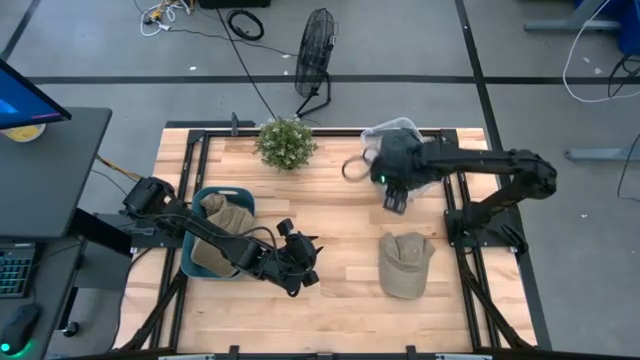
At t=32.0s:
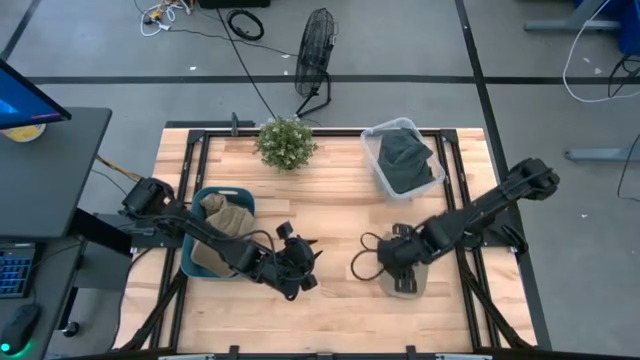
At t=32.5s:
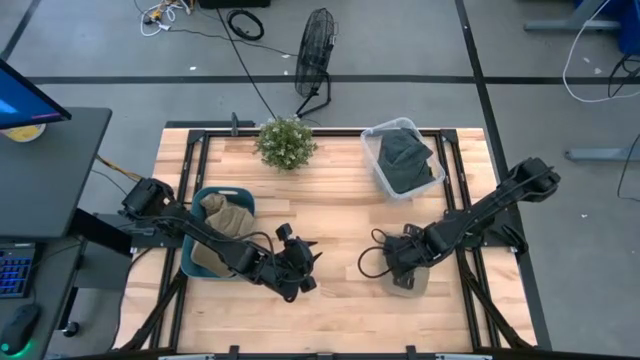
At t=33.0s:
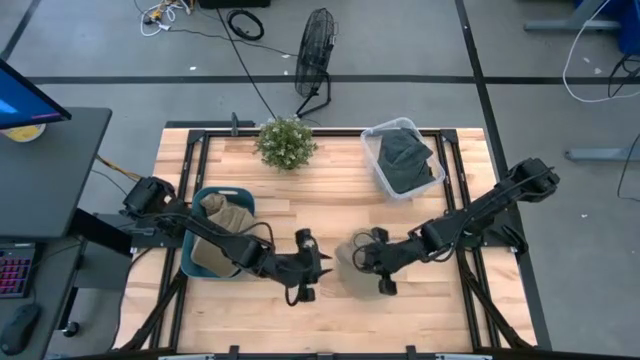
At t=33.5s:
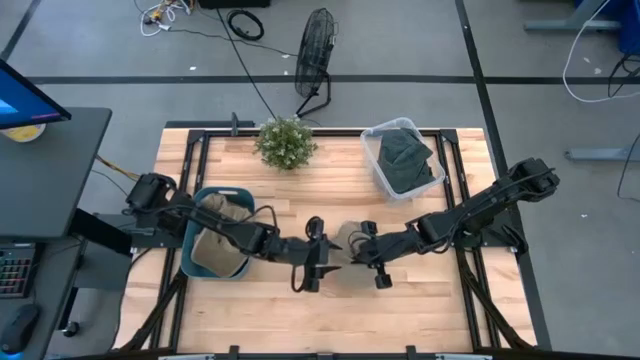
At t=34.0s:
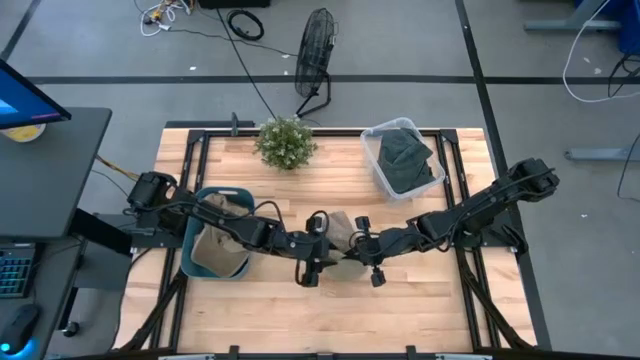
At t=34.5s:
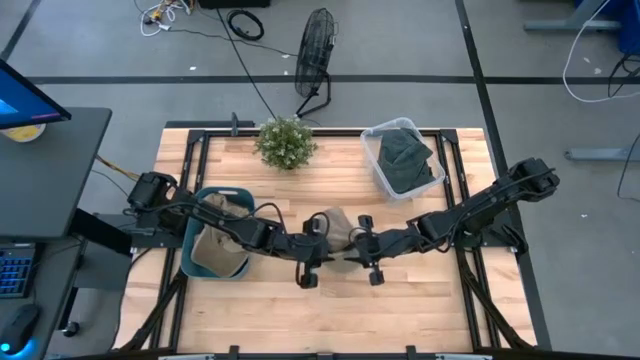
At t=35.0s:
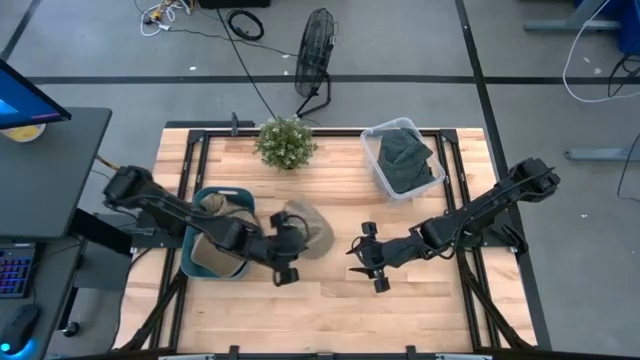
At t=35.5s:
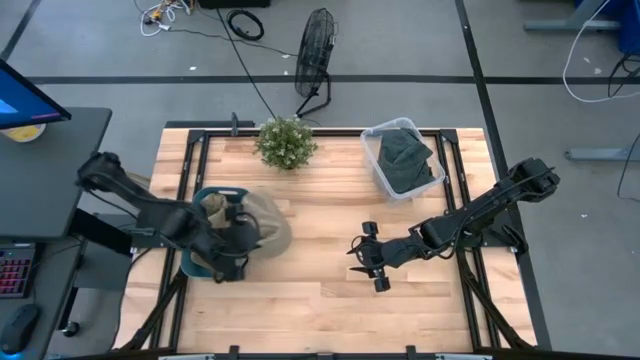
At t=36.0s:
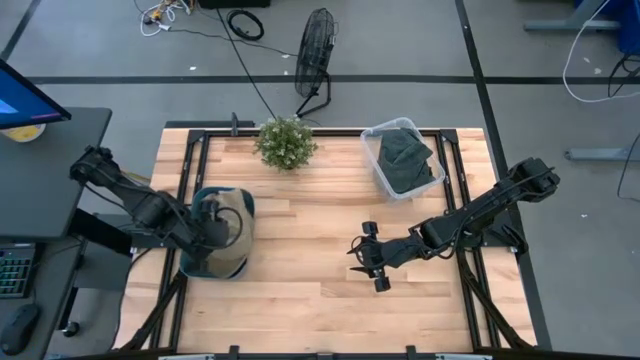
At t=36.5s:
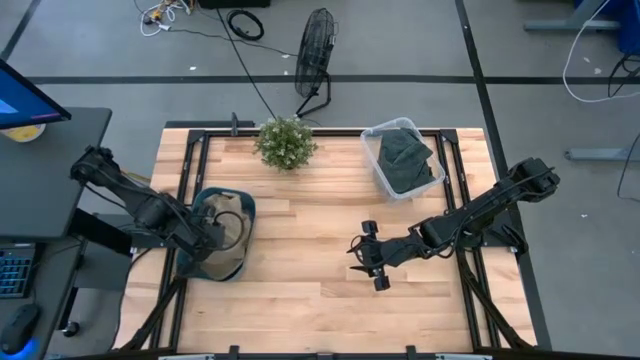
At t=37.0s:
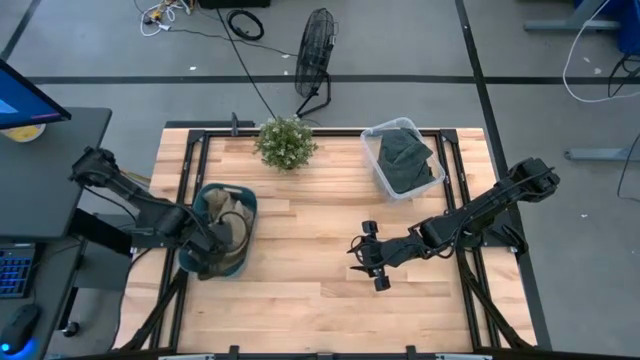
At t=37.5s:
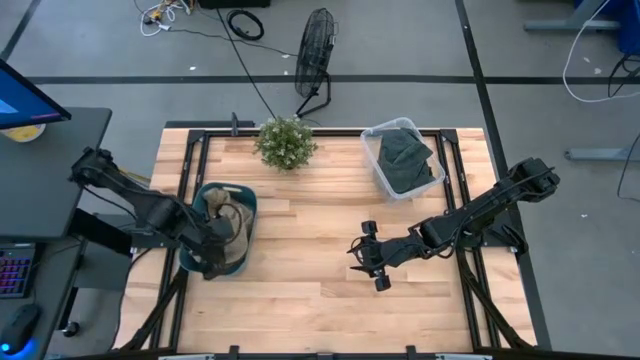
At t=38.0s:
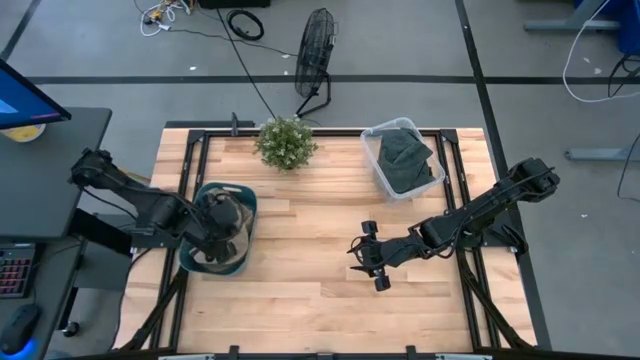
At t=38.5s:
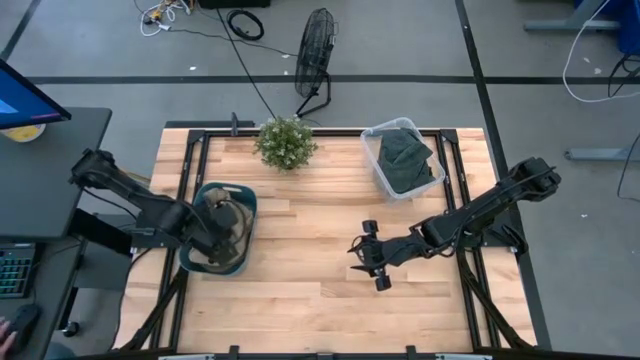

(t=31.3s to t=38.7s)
Task: Pick & Place hat
Put the brown cap into the blue bin

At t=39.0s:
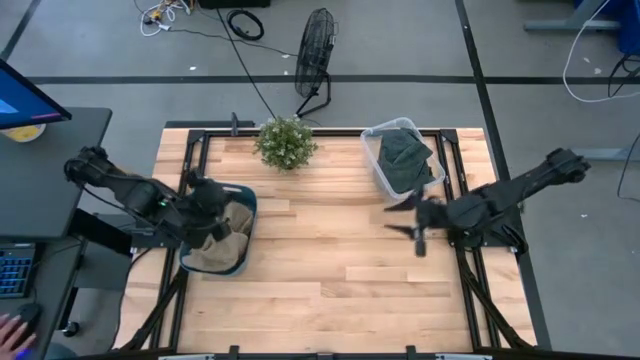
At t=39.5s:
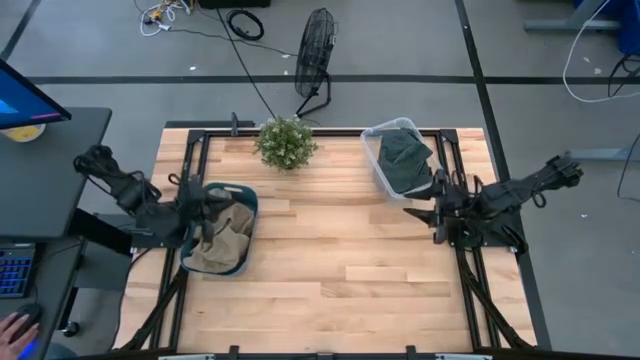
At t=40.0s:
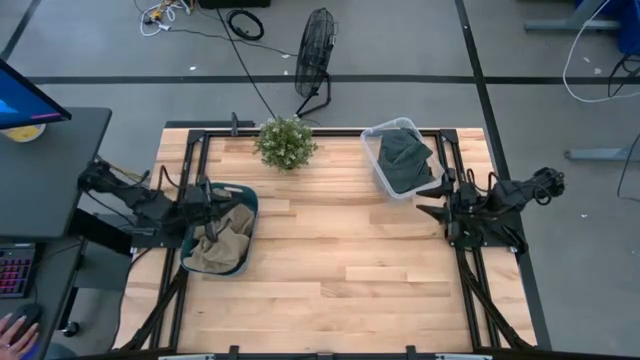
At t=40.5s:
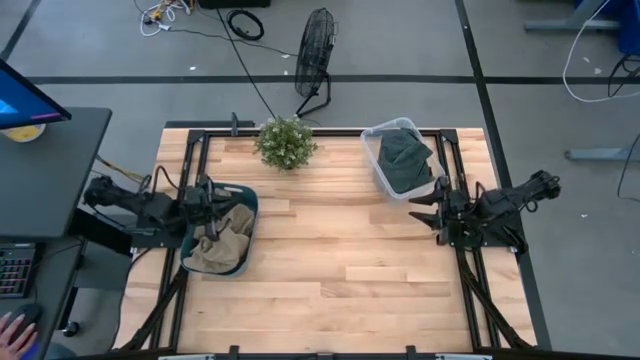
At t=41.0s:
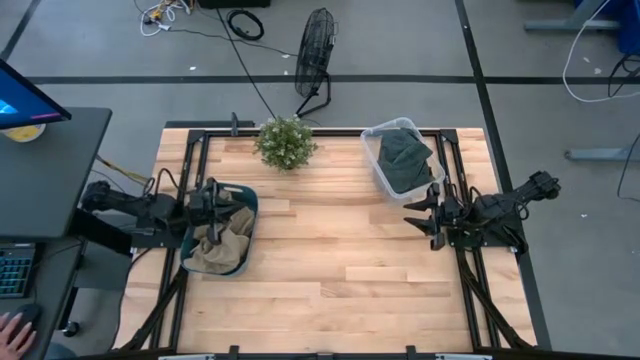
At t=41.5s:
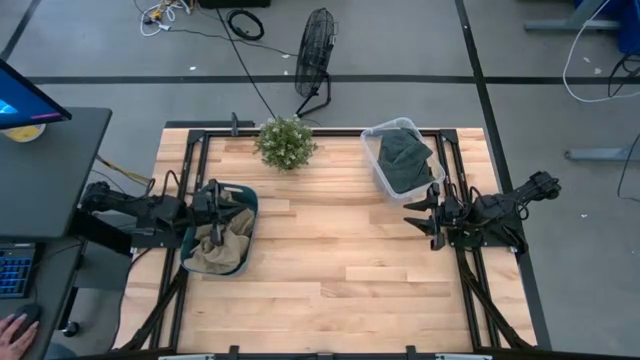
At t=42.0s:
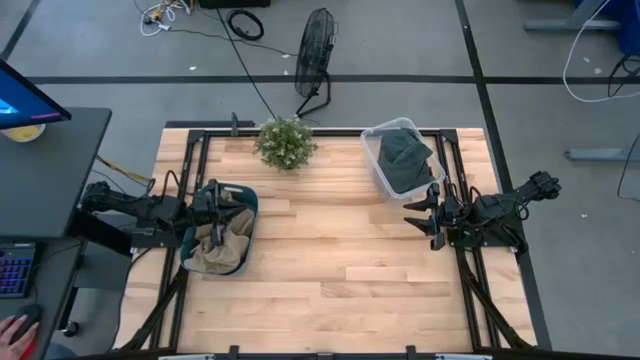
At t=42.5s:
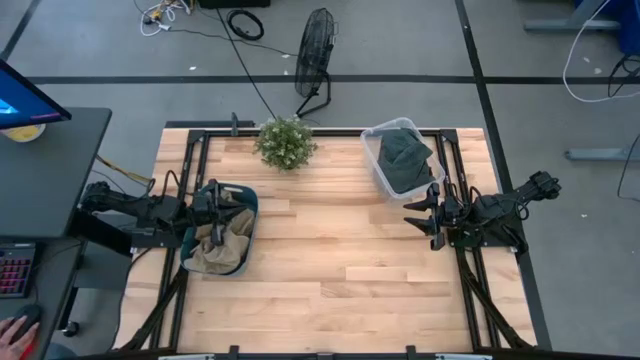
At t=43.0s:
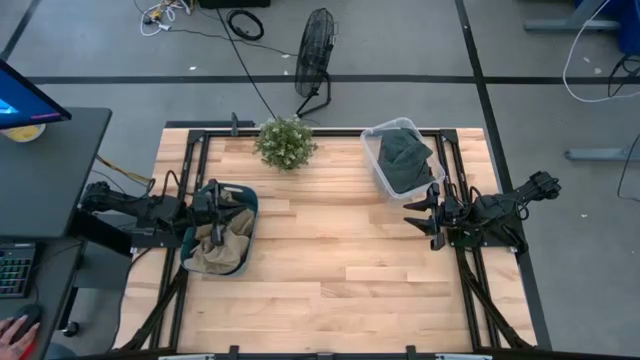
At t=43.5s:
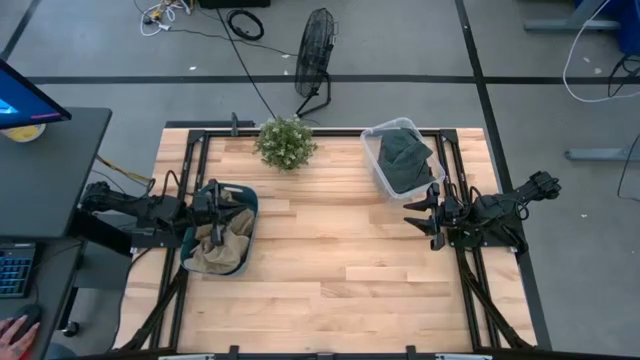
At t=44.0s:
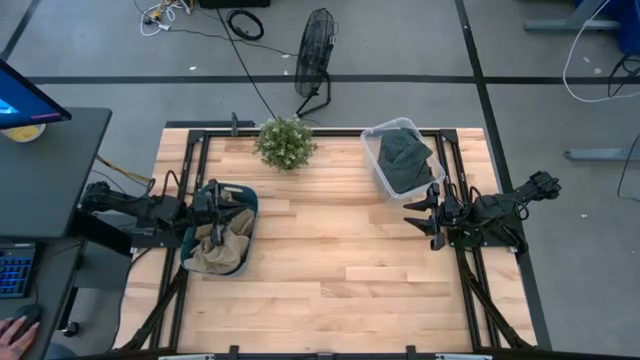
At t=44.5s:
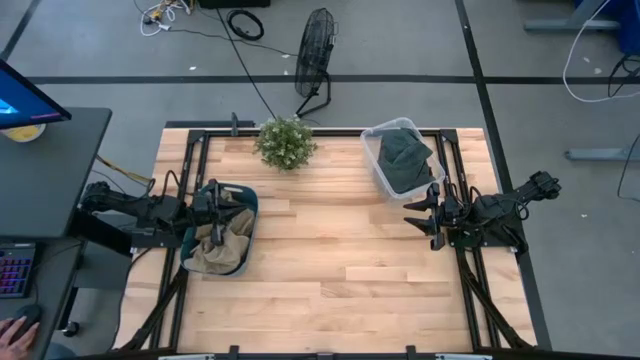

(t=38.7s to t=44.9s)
Return to Home Position

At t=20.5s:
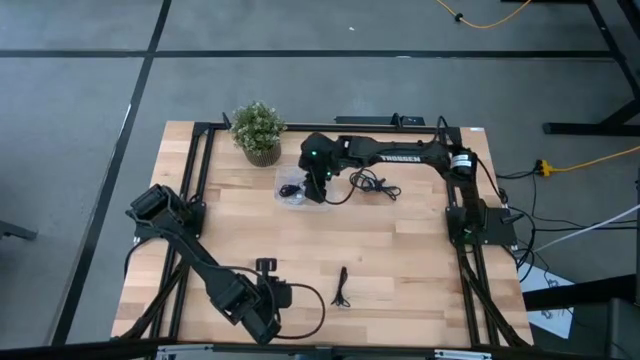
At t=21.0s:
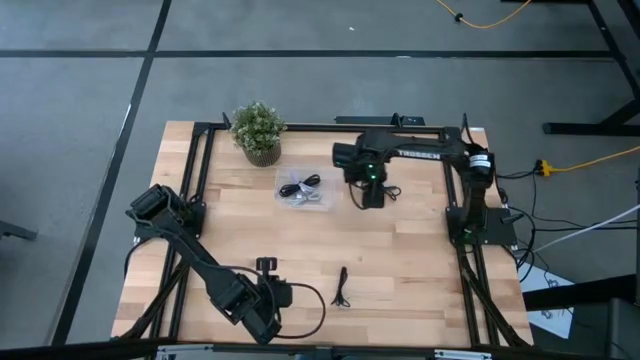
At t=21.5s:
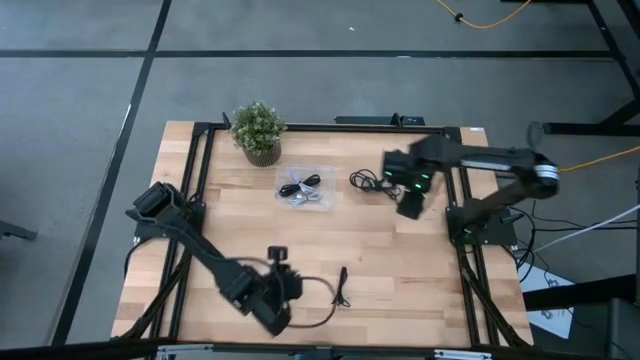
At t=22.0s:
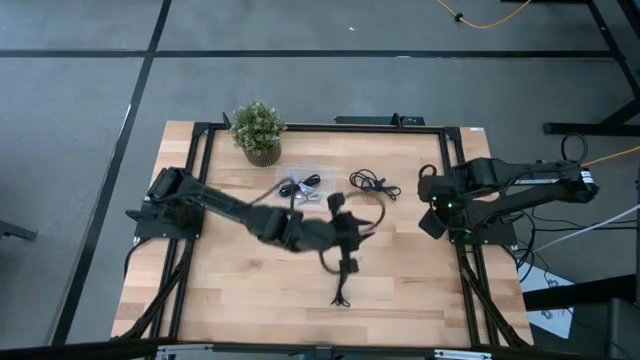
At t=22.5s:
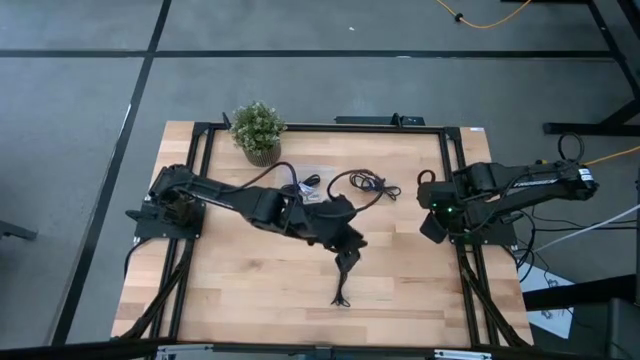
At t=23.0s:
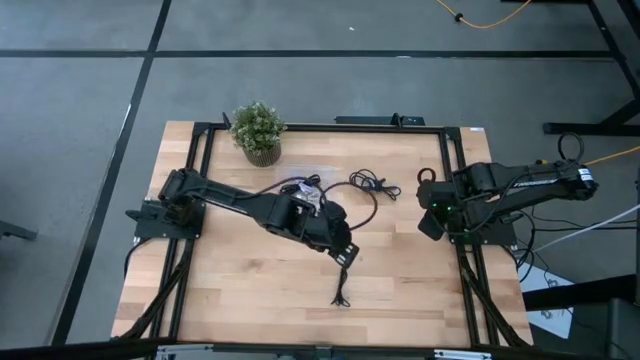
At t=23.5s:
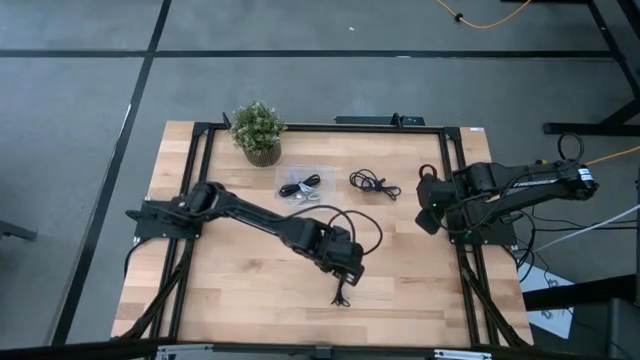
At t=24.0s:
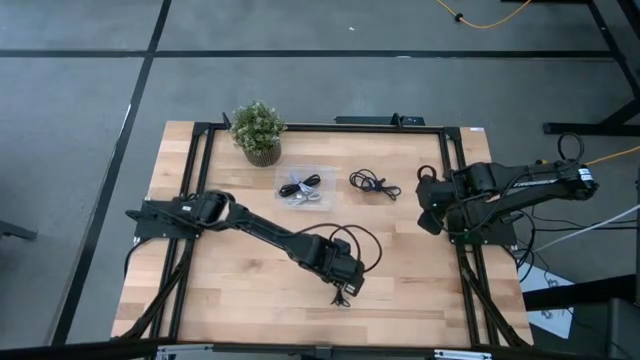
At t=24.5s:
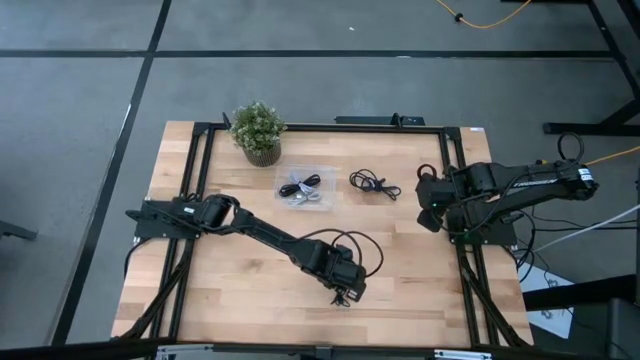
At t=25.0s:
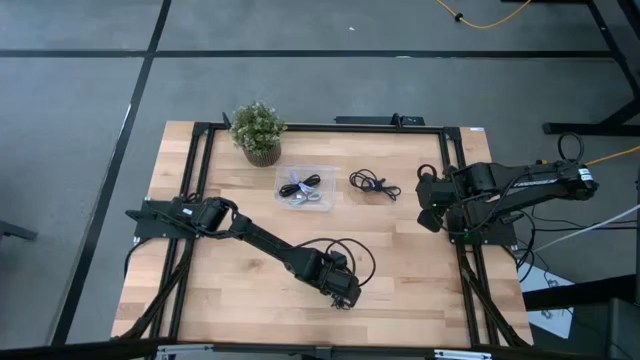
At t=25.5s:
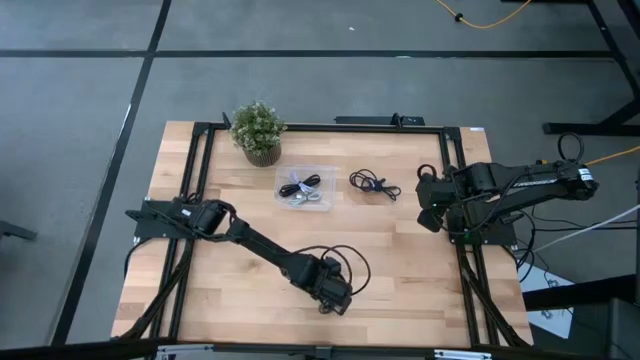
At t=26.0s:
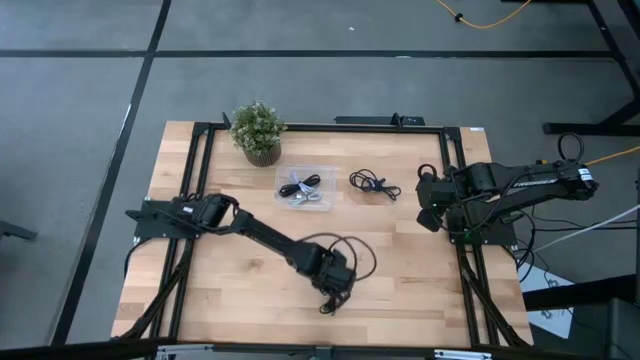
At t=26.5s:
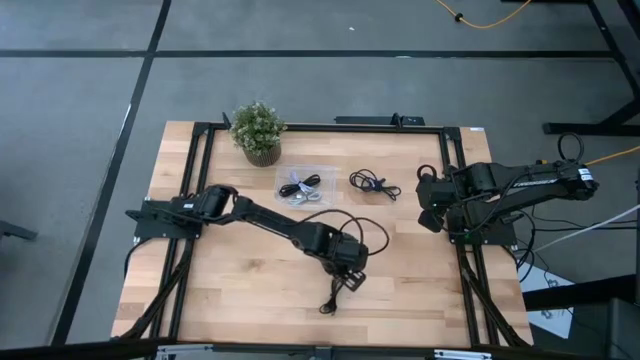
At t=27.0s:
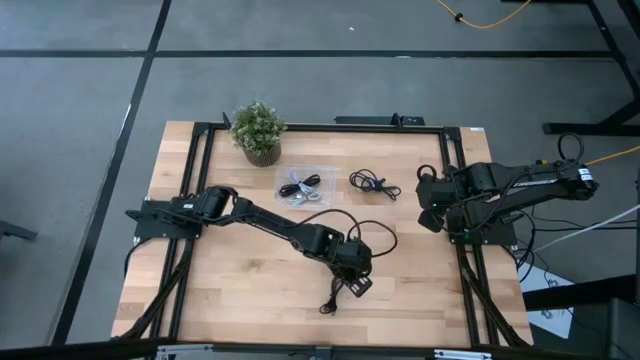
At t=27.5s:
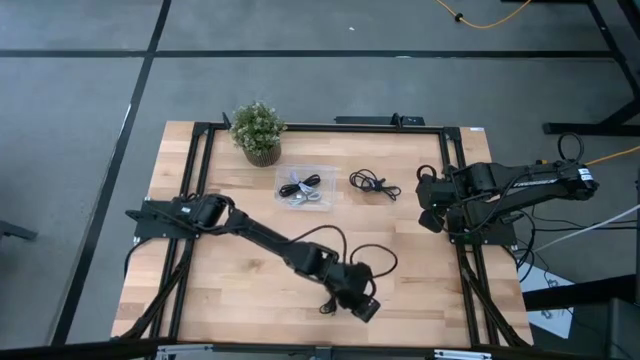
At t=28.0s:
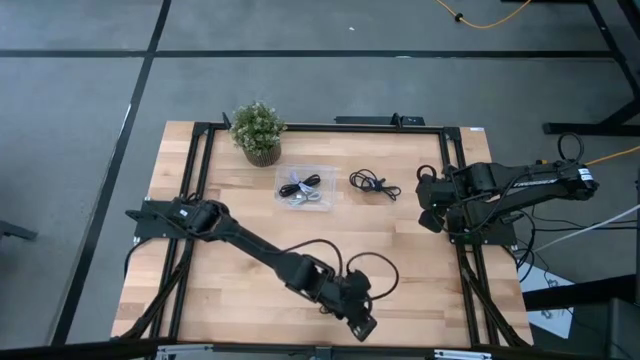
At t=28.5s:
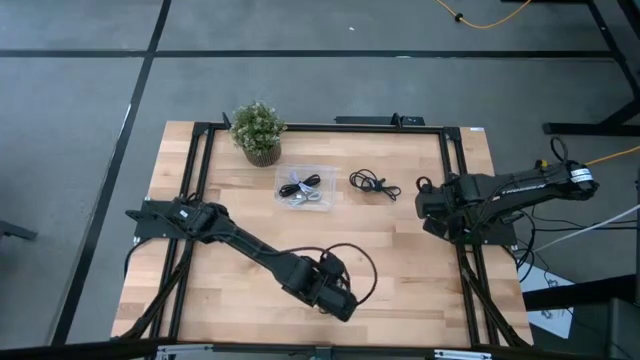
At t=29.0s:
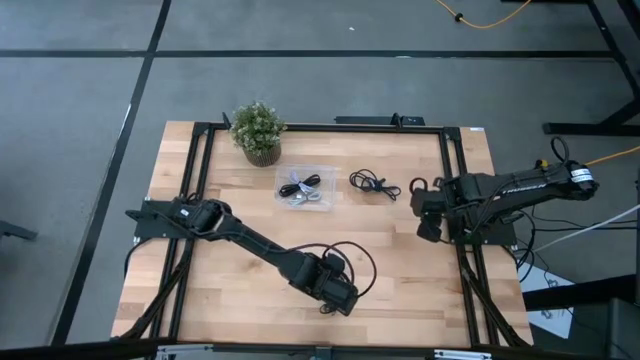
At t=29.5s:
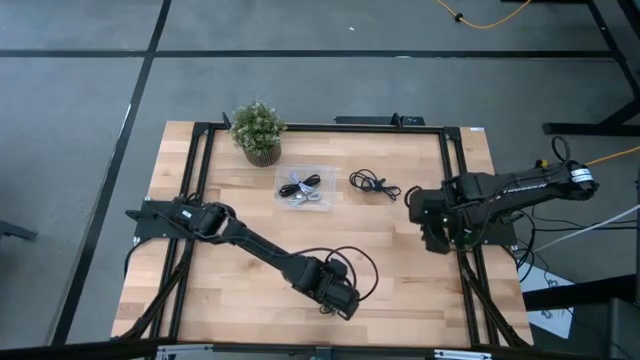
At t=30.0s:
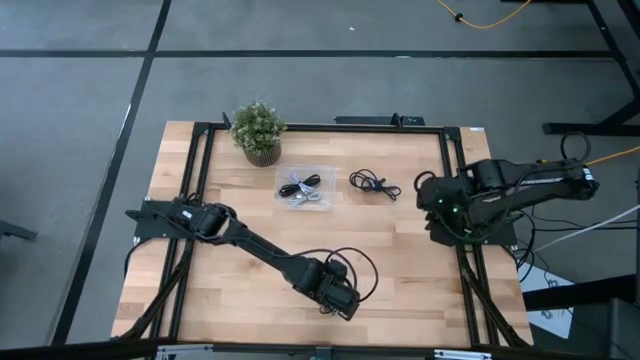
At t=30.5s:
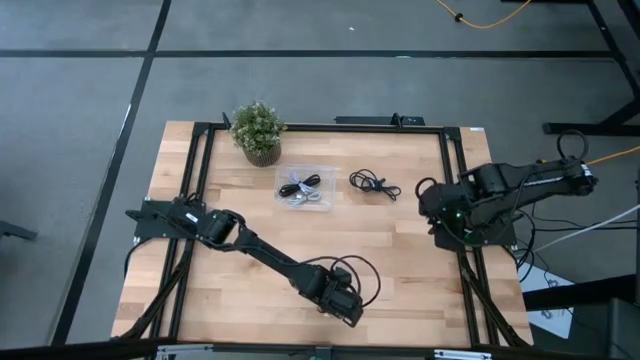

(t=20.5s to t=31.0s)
Task: Pick and place USB-C Cables
Put the bottom black charger cable into the transparent bin
